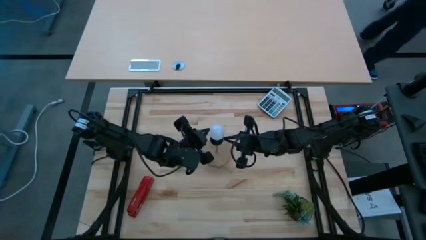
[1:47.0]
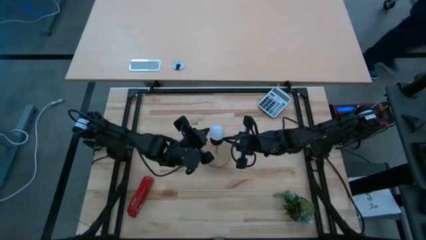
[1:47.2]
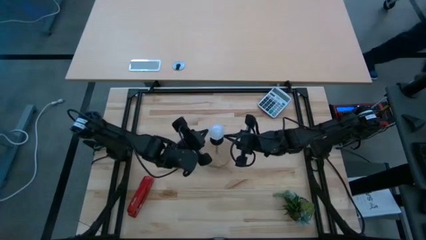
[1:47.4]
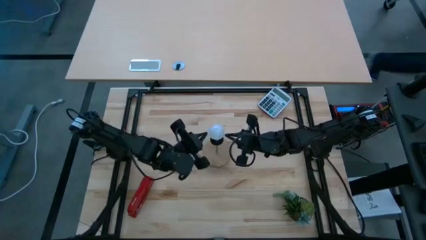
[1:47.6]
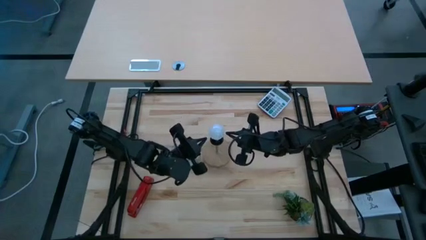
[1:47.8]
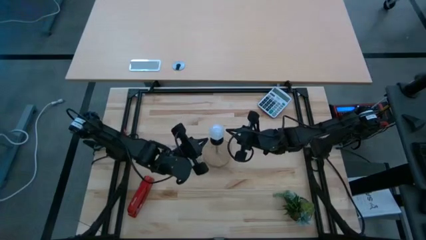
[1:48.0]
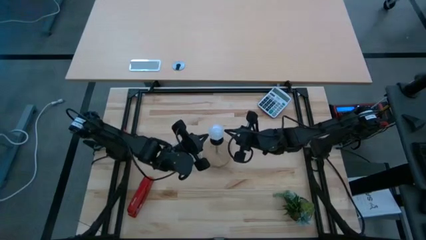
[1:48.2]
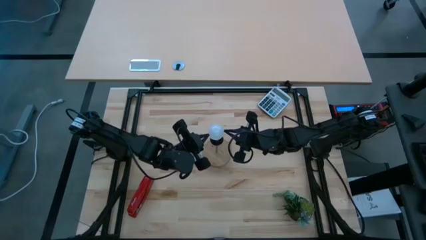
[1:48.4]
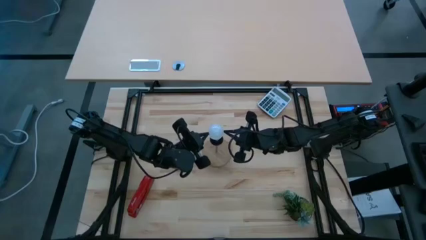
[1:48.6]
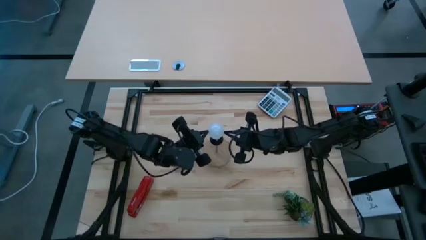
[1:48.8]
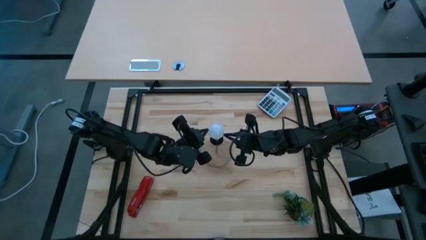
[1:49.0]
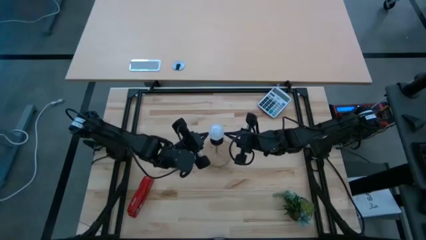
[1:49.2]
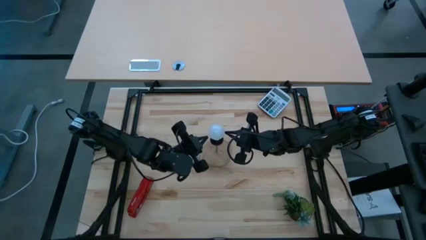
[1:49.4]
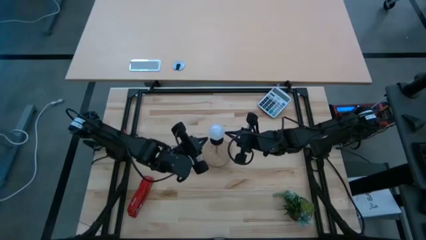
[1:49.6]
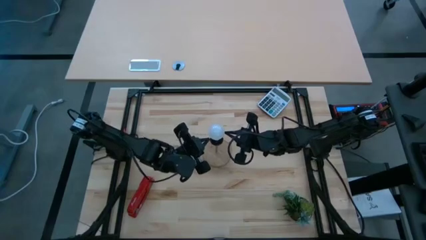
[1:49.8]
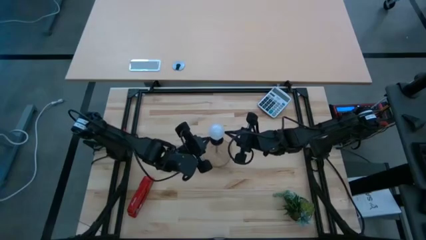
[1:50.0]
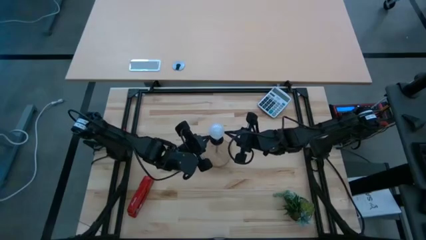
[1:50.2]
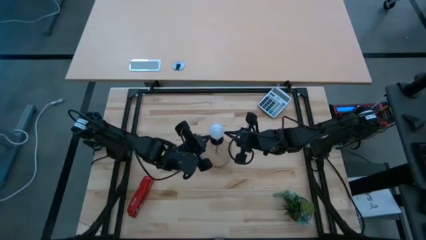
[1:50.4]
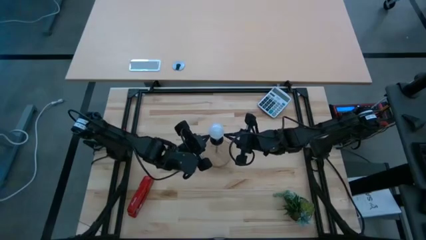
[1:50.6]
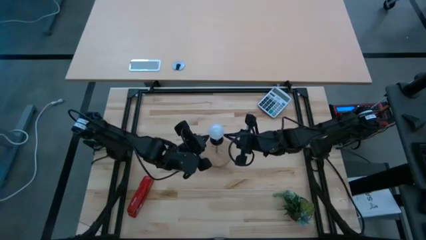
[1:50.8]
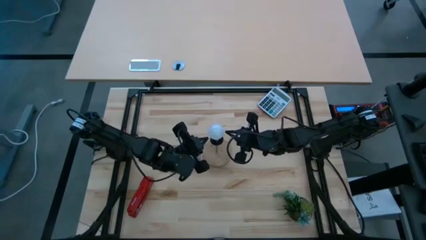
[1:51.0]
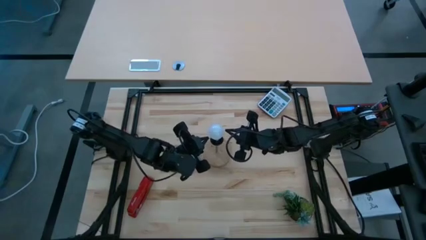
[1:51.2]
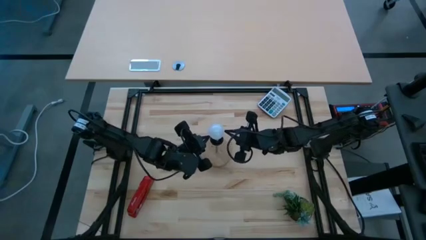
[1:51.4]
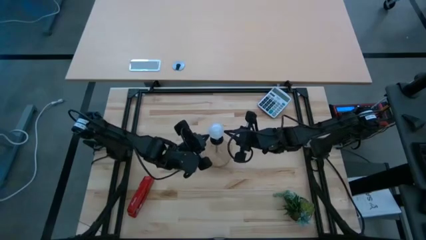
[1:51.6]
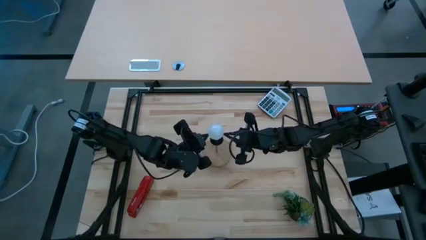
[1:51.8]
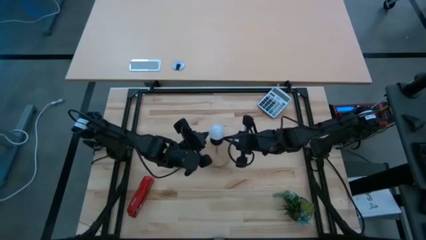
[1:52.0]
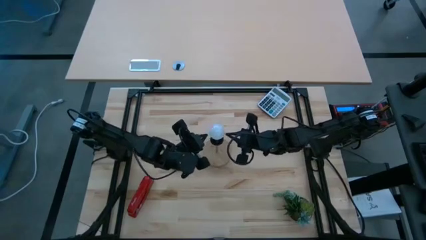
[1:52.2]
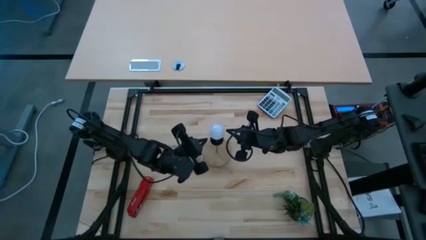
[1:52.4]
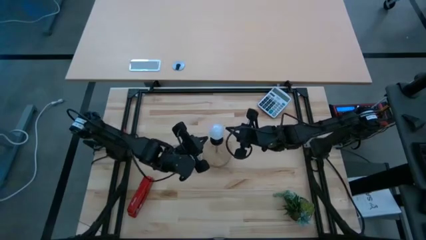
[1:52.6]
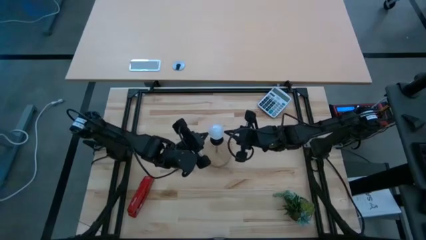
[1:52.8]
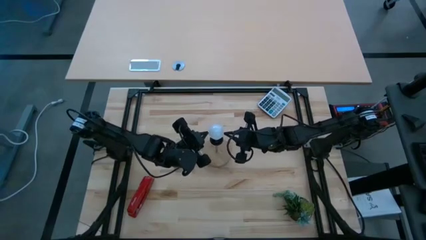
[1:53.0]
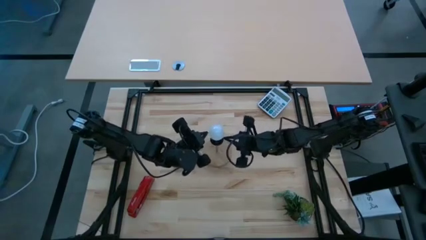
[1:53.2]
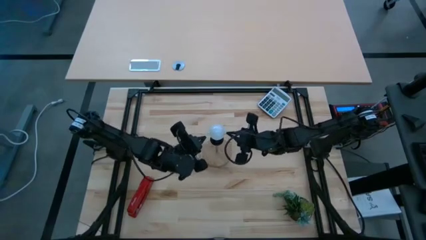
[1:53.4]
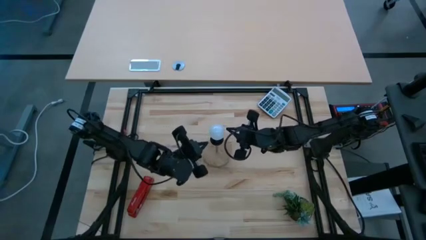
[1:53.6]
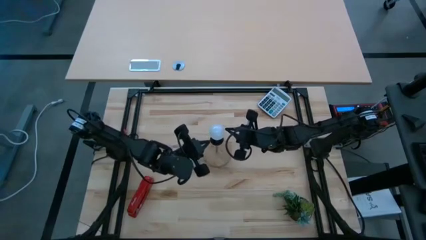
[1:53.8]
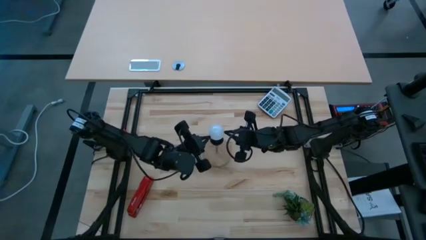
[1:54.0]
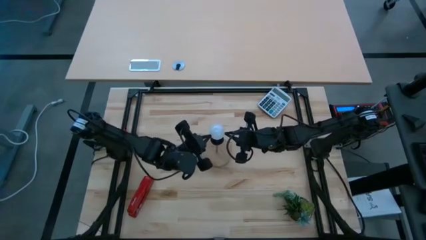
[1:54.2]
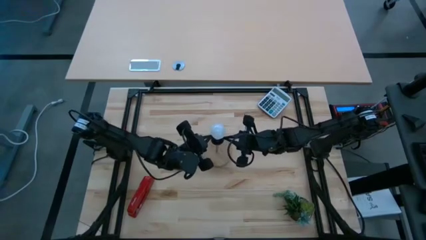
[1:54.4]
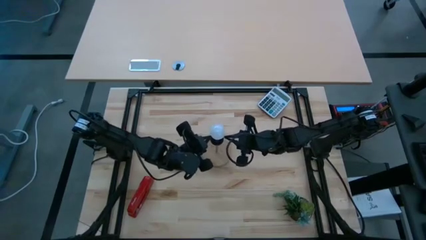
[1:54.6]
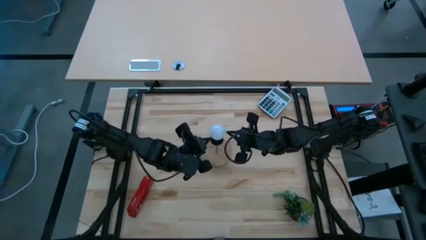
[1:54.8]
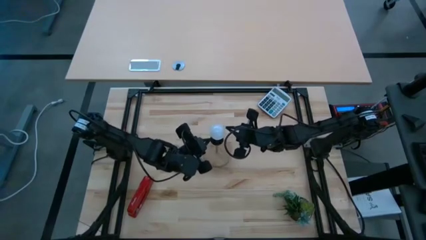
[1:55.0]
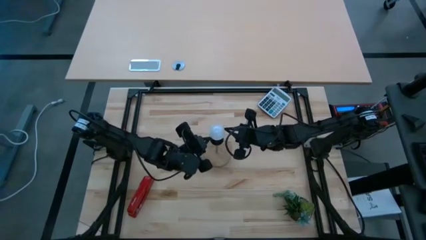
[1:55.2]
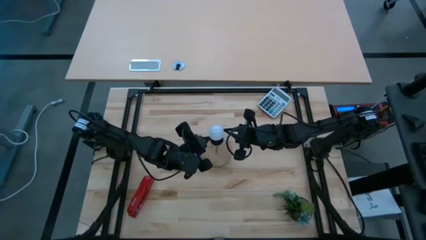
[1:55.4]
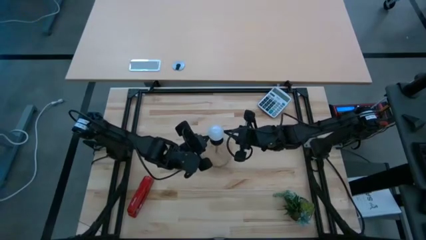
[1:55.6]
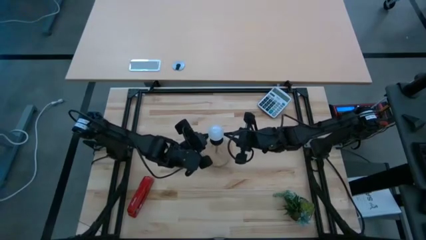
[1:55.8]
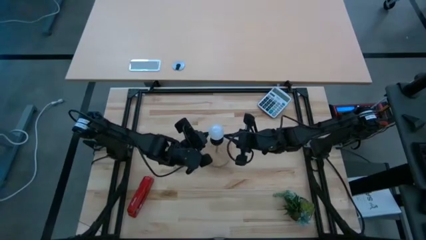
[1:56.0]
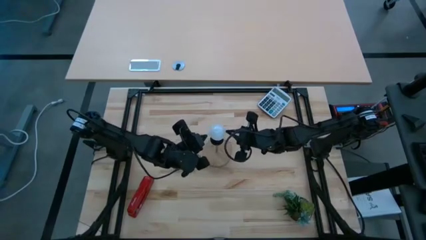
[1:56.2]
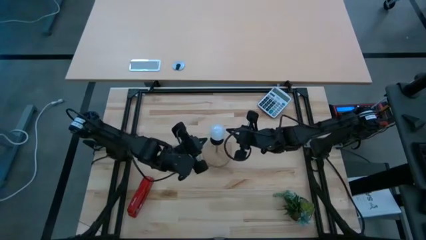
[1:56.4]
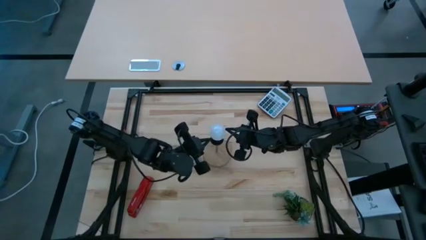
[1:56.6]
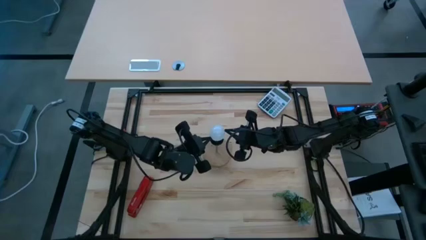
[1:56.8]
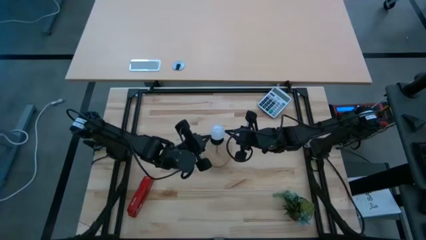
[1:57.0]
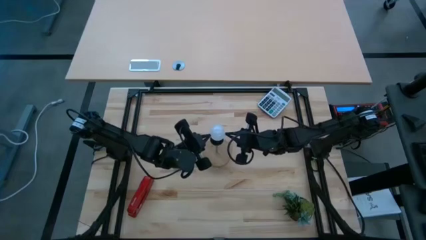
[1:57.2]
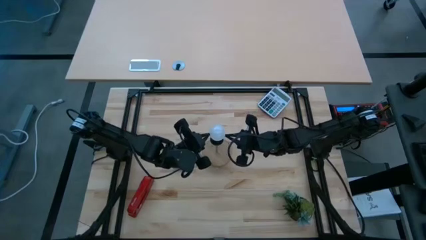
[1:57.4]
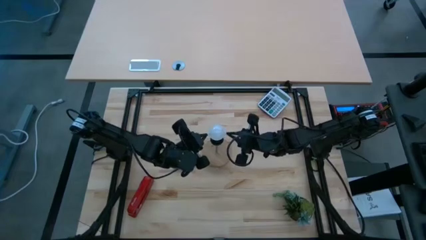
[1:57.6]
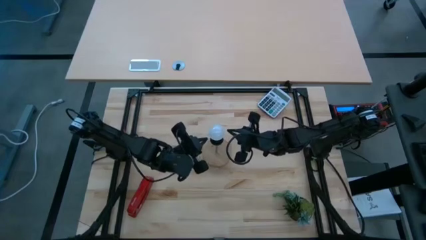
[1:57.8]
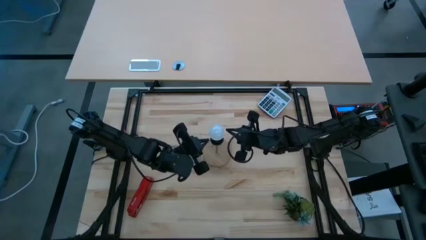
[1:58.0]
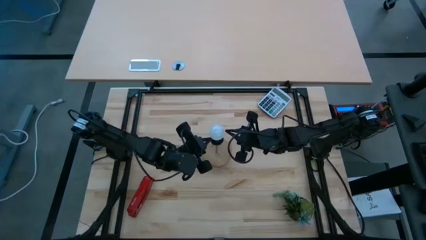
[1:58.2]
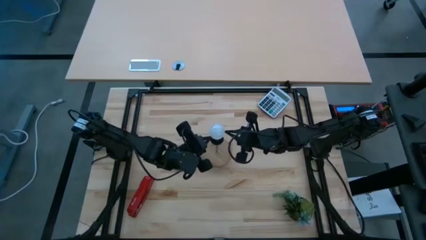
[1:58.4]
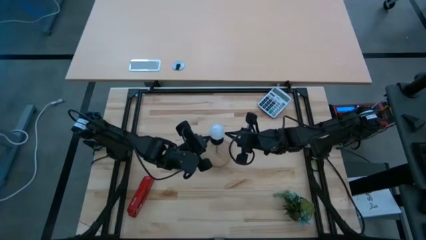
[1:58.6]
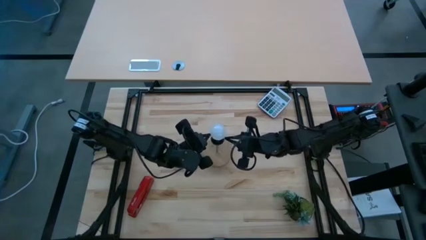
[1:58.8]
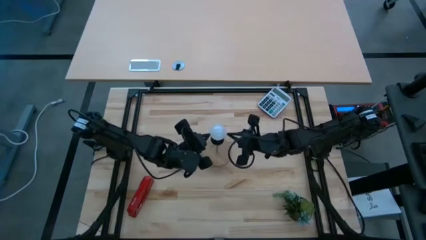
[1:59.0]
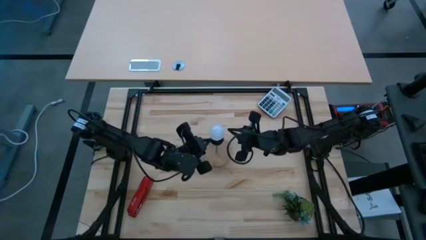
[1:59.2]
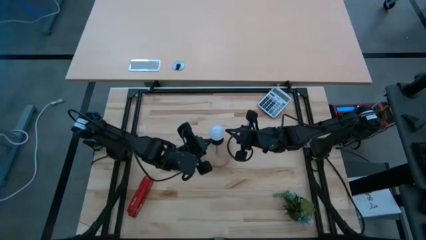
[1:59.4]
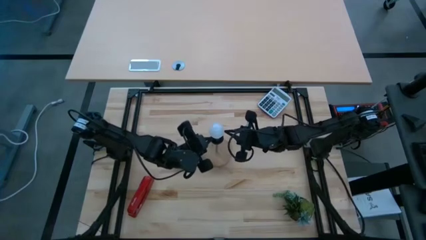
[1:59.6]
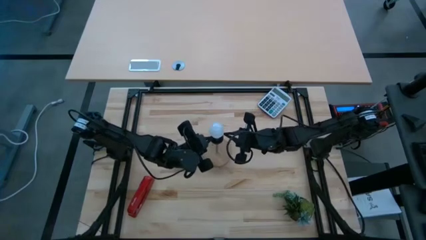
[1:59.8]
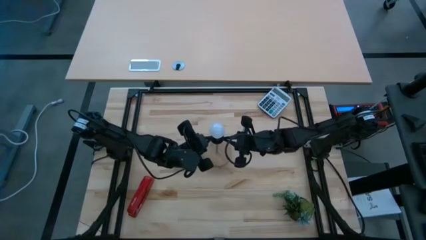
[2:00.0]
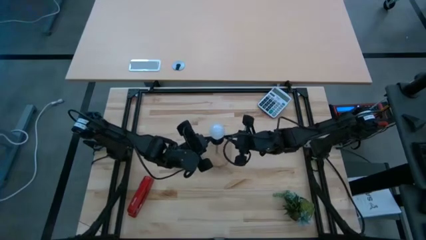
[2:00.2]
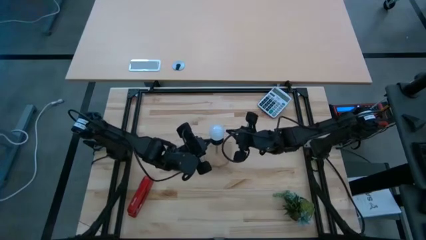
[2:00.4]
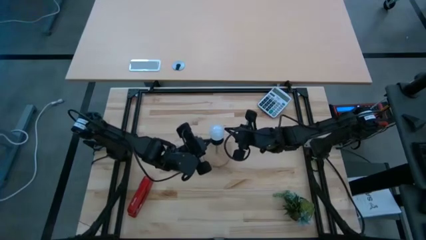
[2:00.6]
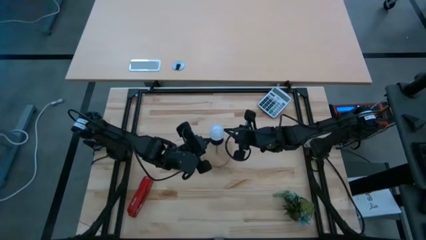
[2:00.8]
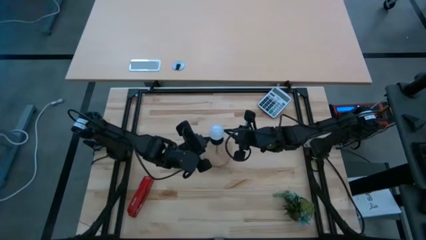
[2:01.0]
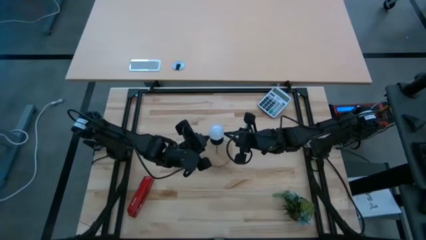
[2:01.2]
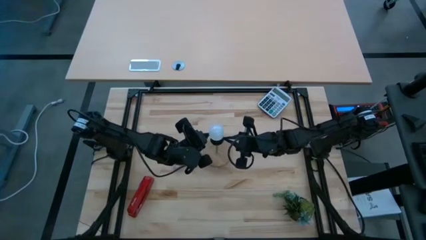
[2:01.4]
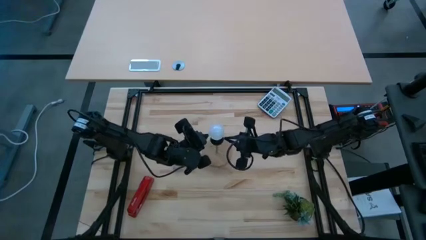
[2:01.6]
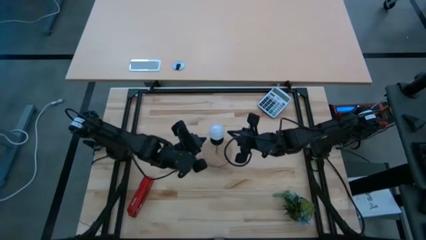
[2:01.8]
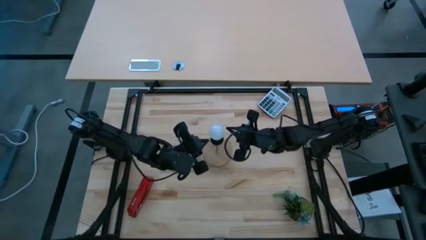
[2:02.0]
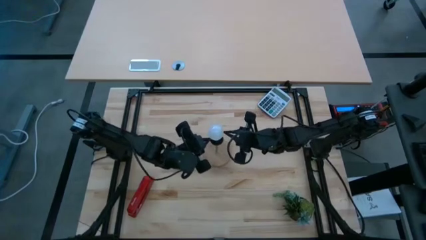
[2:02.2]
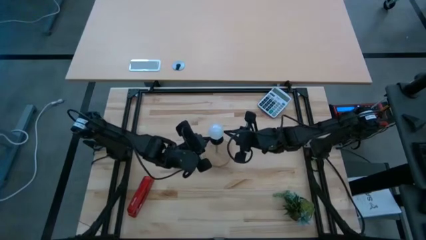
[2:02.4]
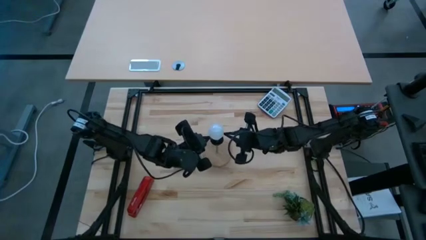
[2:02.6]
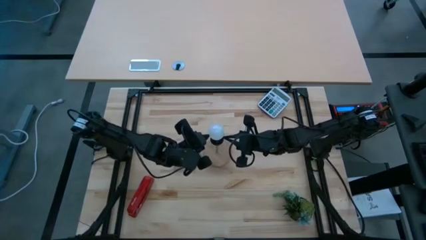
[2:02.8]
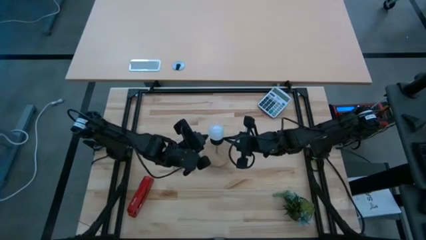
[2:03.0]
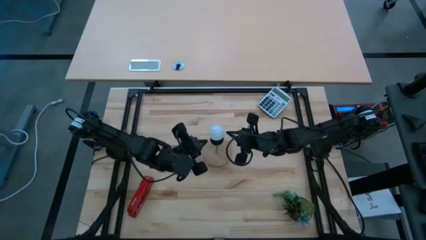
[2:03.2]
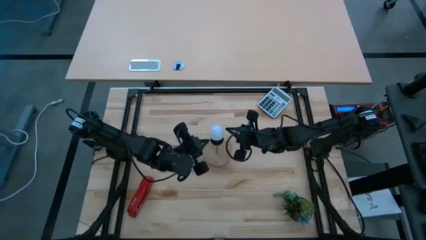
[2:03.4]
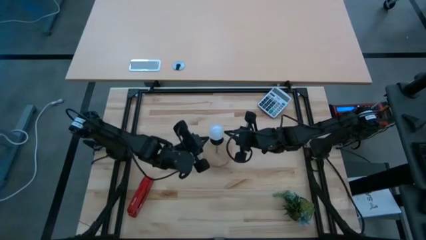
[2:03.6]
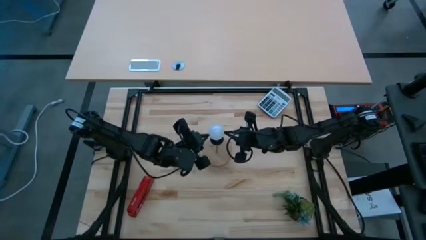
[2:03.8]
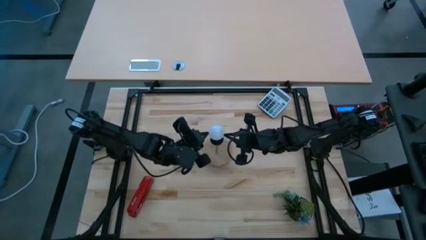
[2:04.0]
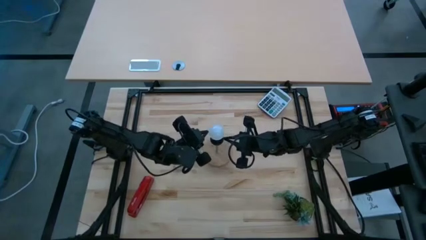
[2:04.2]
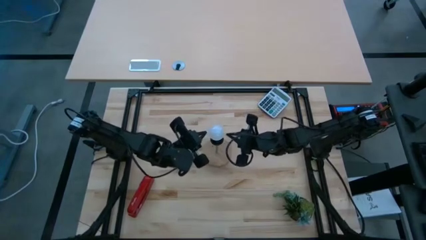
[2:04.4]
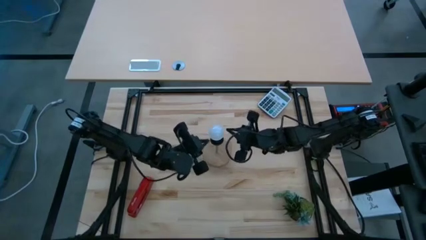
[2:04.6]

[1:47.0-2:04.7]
Task: Screw lightbulb
Insert the lightbulb into the brown lamp
